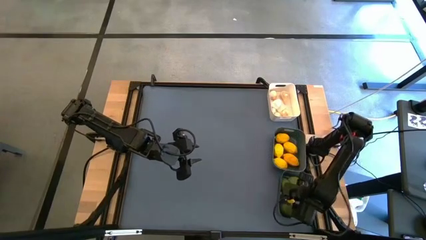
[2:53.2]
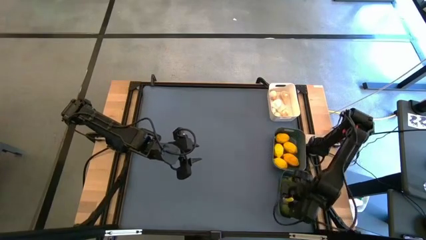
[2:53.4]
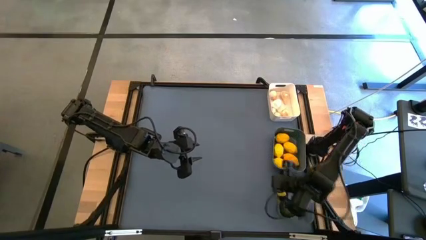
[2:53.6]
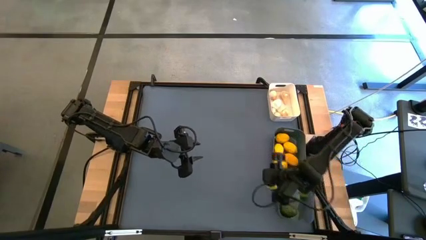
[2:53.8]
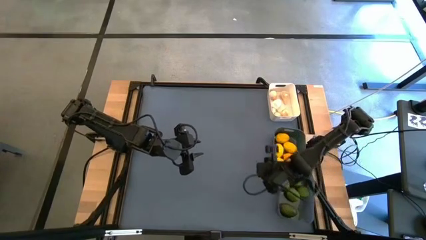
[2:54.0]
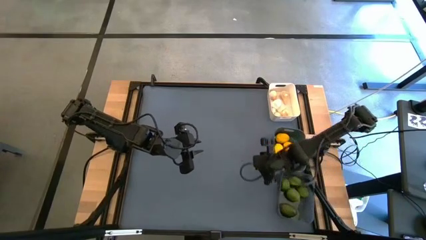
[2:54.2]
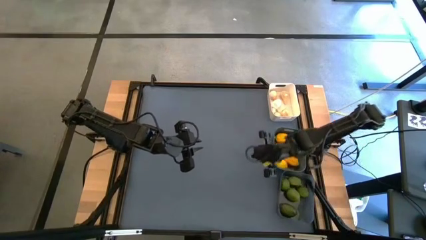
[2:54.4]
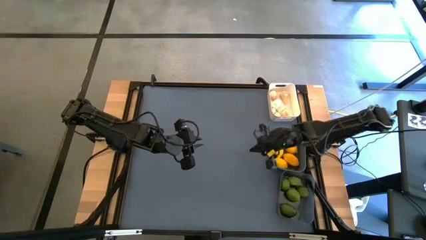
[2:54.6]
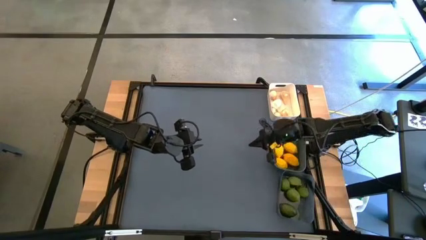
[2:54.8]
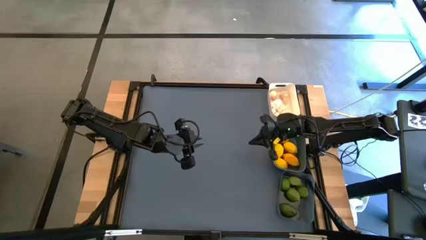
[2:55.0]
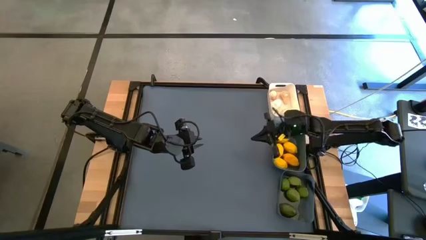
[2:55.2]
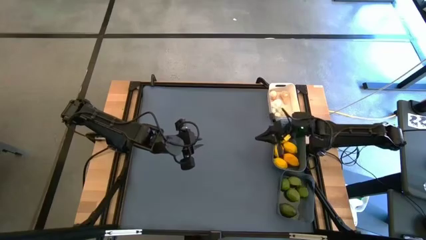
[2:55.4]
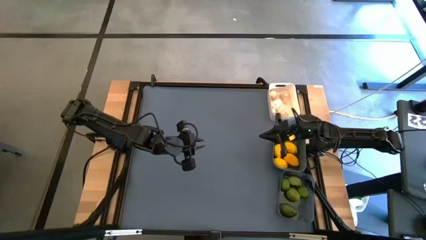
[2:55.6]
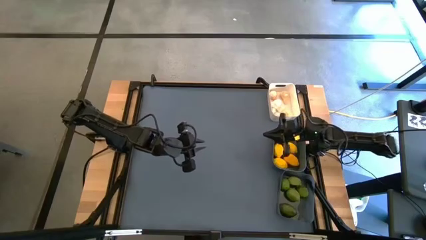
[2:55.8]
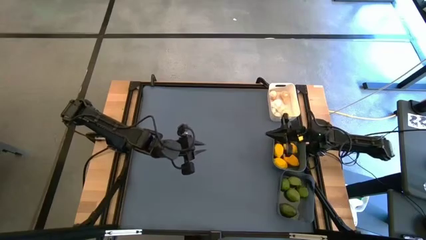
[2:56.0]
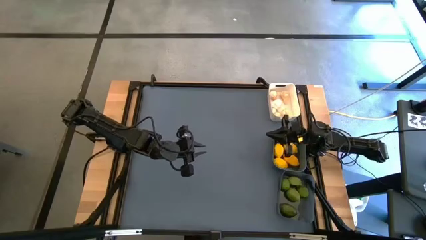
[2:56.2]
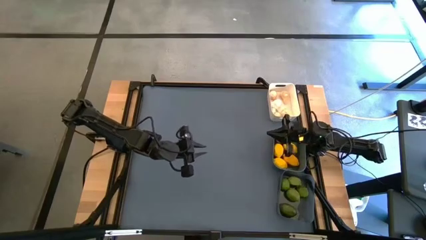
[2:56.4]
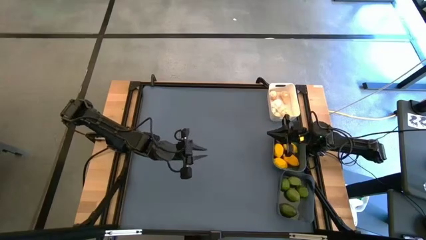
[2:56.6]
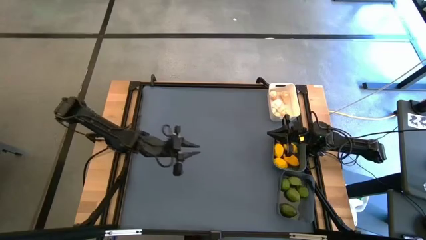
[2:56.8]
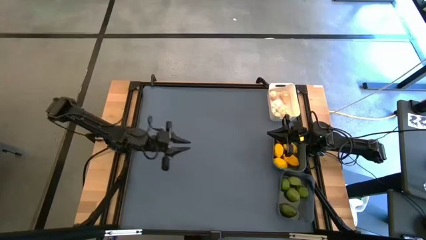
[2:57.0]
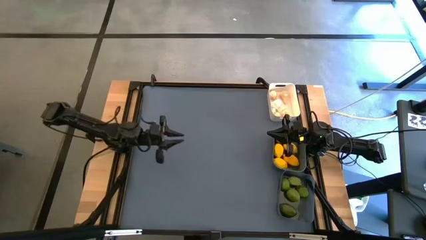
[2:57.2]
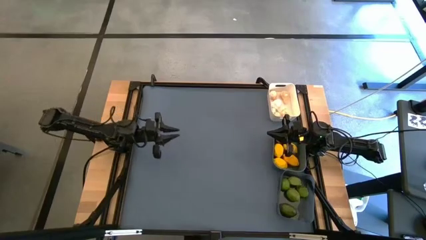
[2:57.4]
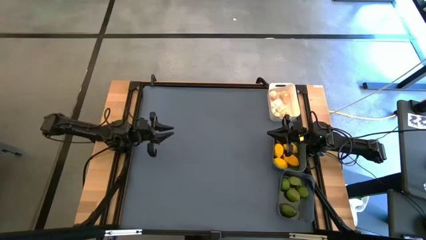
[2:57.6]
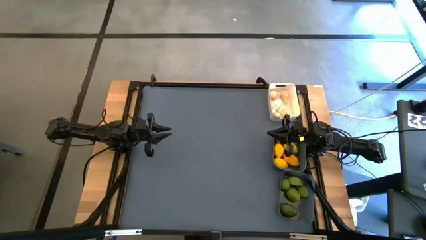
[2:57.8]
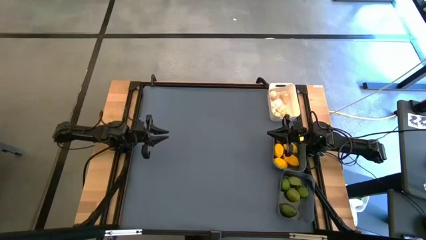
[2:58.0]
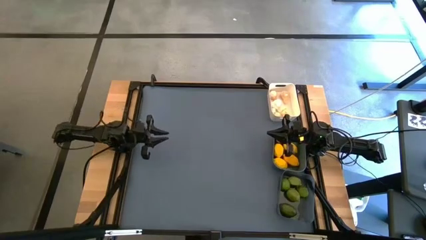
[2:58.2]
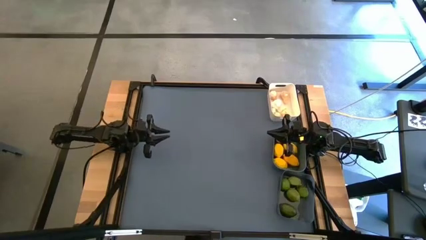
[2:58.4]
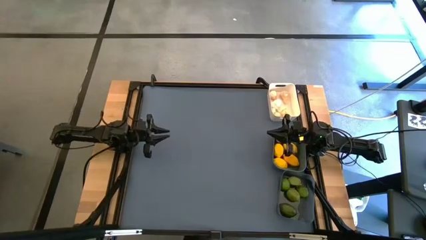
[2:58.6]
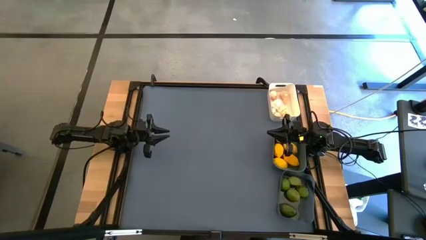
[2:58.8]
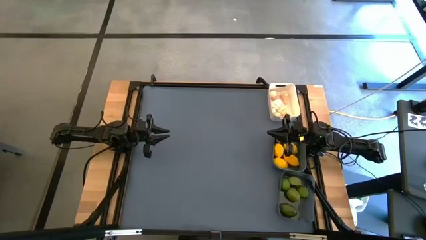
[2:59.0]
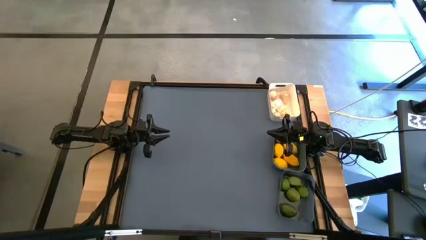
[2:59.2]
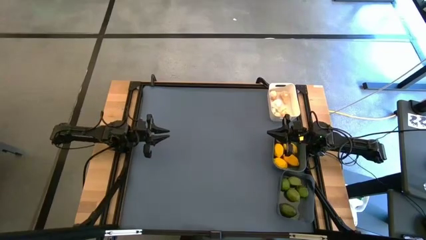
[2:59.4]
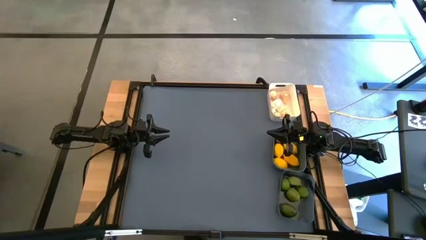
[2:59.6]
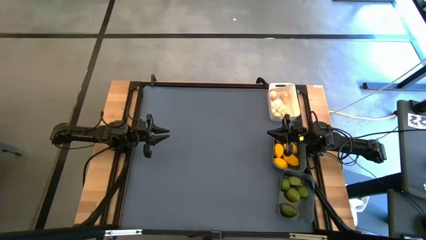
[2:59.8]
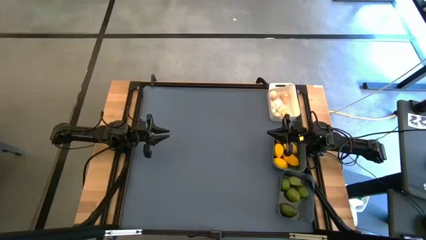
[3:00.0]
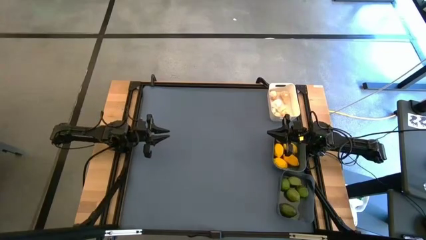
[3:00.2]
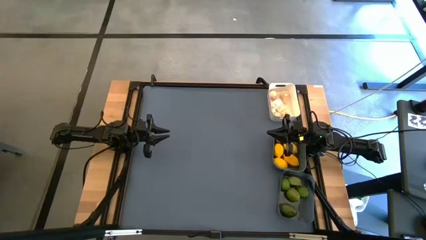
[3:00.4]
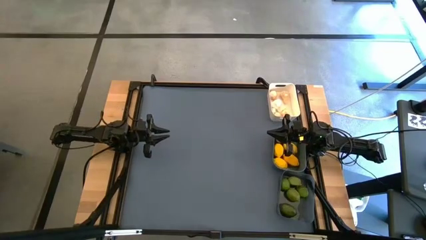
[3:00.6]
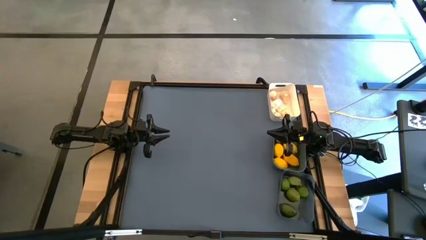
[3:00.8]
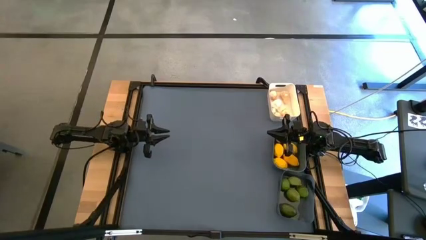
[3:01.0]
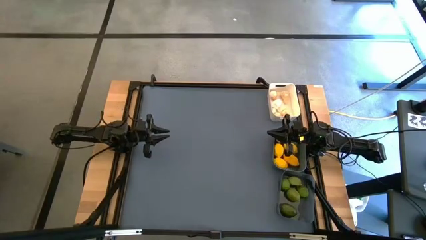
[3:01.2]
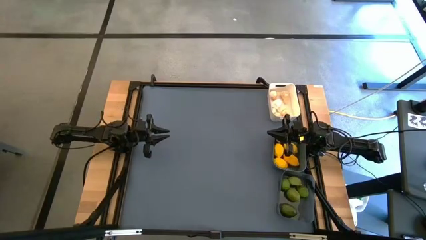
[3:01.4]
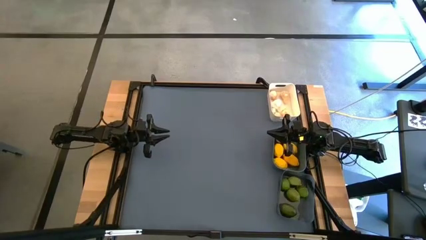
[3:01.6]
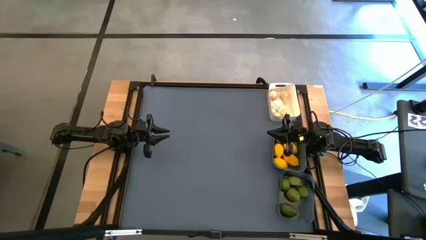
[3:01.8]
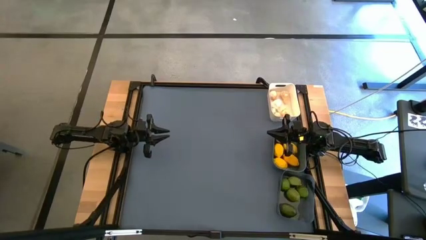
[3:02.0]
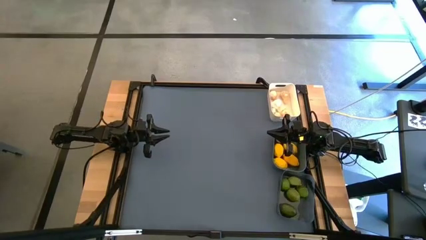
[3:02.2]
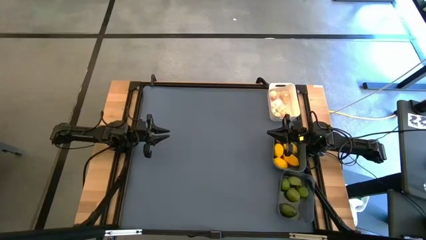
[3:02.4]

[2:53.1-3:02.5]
Task: Sort produce into baskets
Return to Home Position

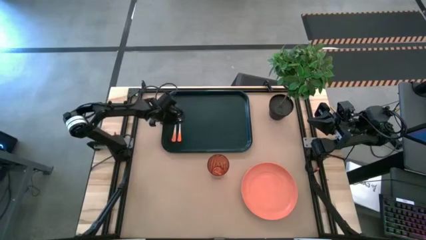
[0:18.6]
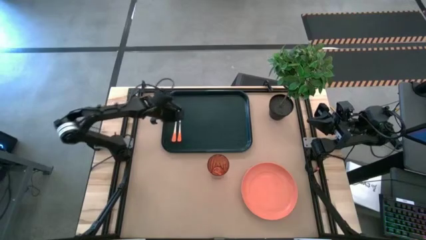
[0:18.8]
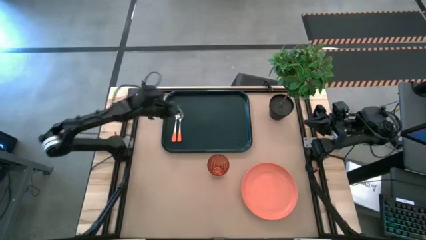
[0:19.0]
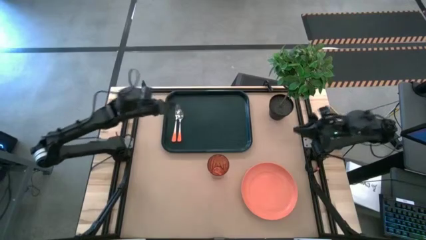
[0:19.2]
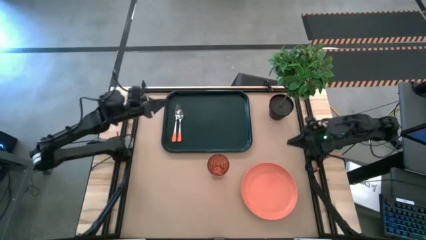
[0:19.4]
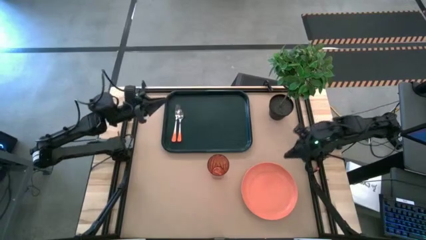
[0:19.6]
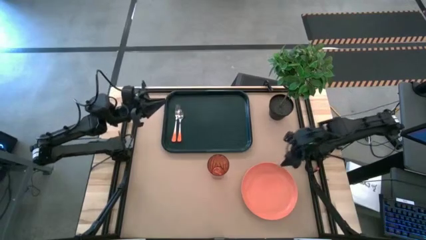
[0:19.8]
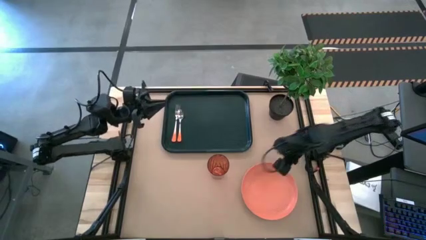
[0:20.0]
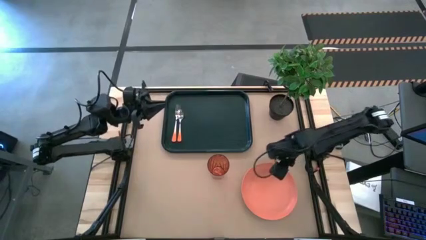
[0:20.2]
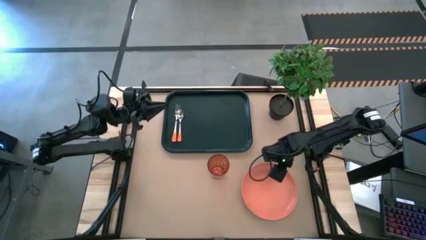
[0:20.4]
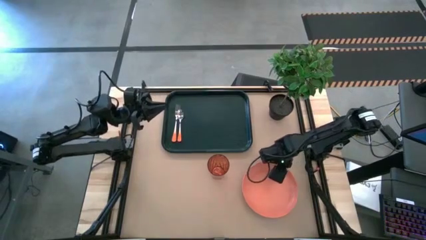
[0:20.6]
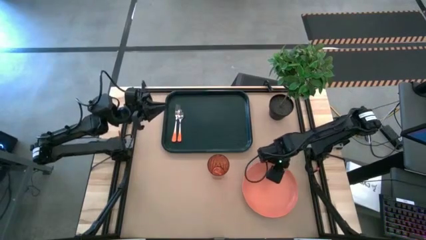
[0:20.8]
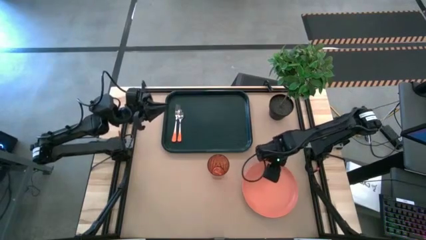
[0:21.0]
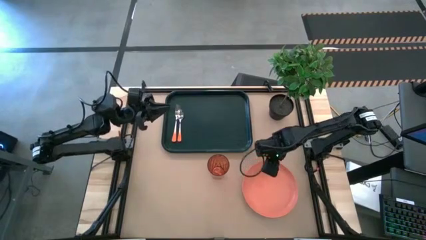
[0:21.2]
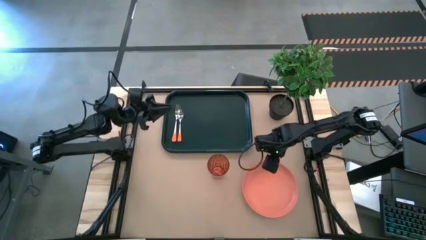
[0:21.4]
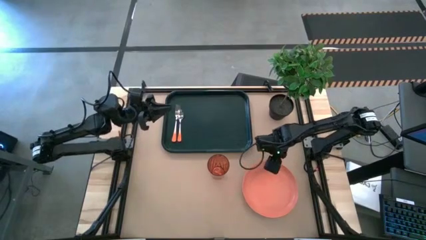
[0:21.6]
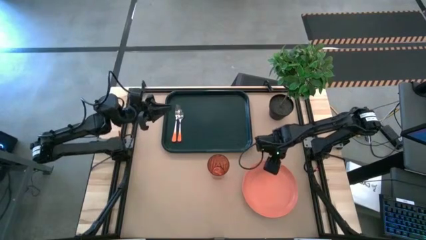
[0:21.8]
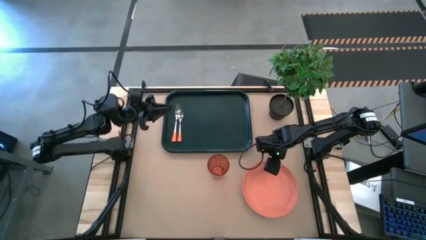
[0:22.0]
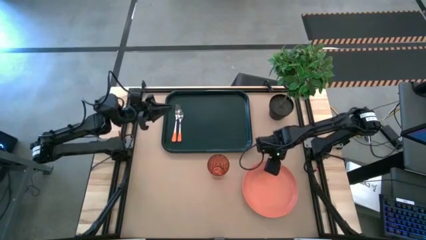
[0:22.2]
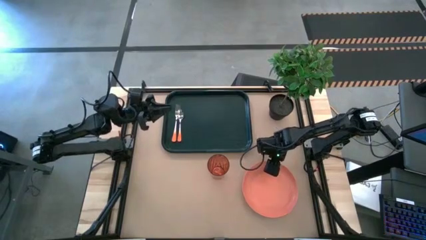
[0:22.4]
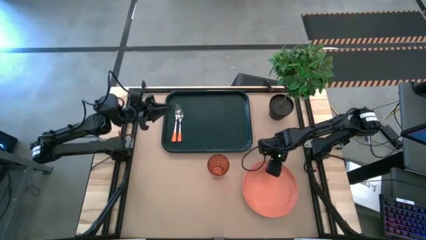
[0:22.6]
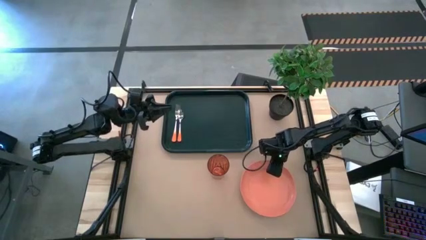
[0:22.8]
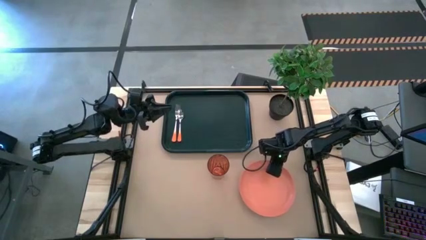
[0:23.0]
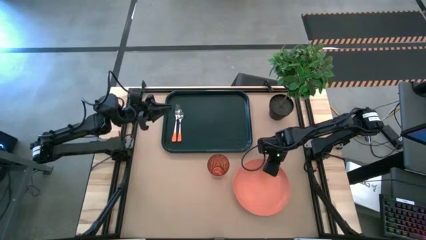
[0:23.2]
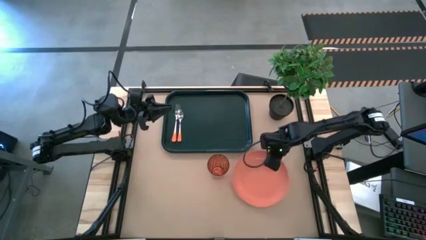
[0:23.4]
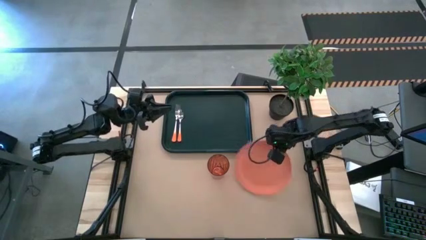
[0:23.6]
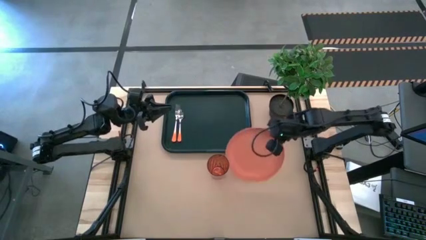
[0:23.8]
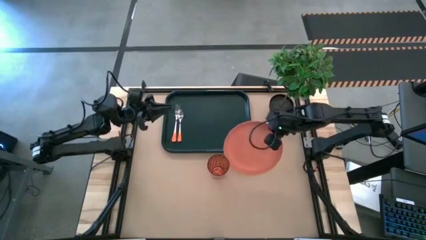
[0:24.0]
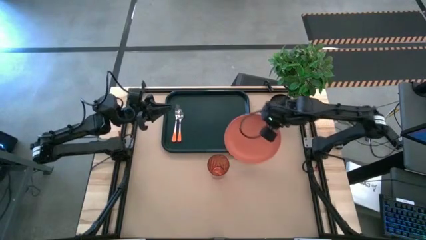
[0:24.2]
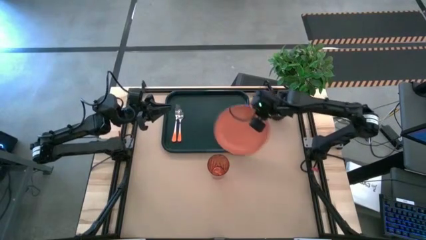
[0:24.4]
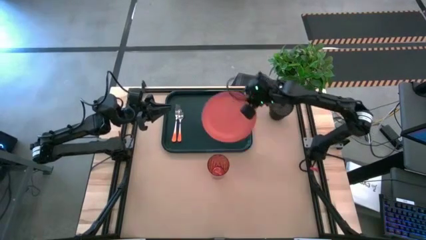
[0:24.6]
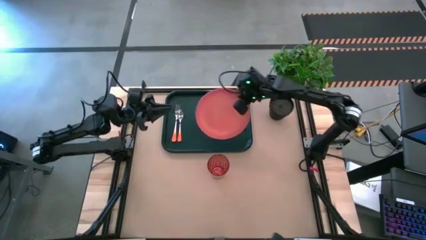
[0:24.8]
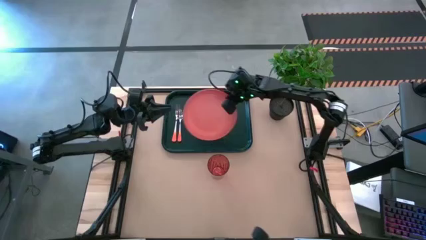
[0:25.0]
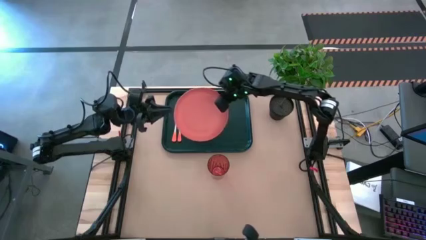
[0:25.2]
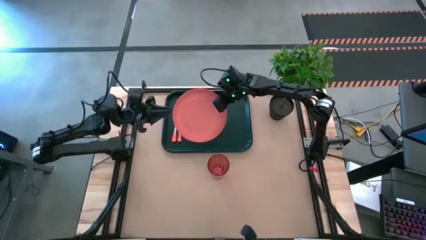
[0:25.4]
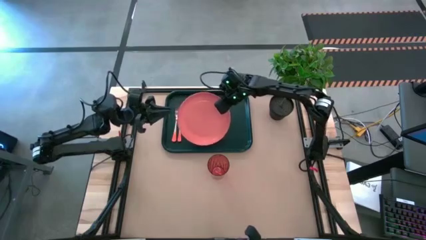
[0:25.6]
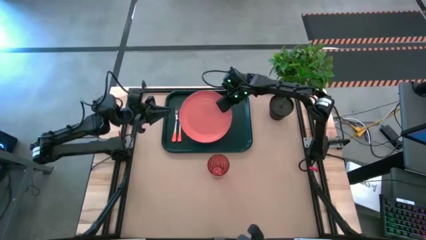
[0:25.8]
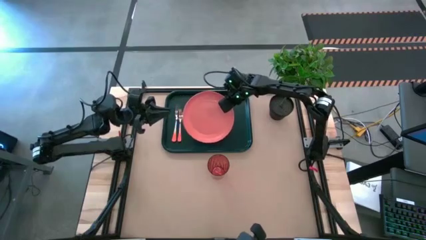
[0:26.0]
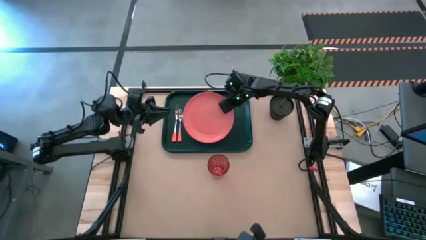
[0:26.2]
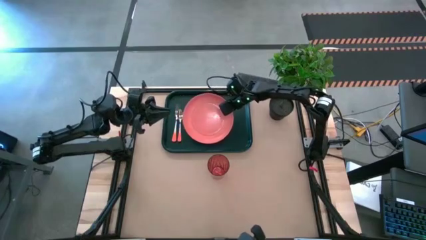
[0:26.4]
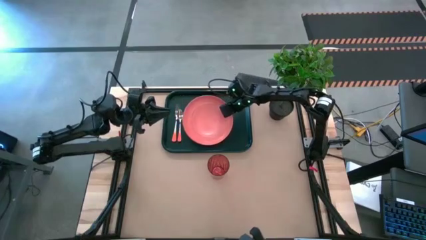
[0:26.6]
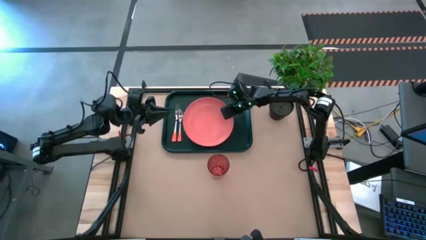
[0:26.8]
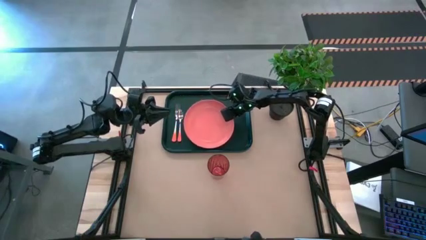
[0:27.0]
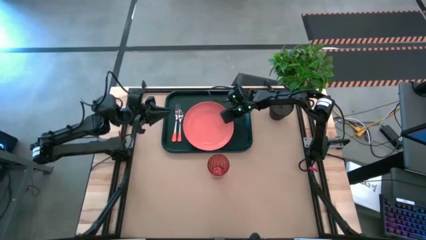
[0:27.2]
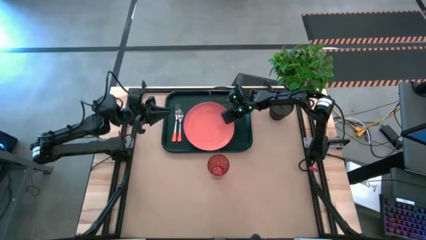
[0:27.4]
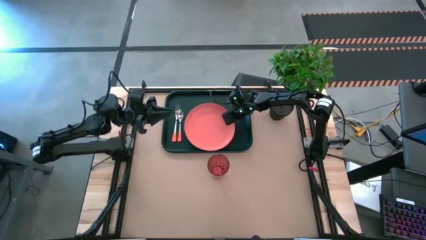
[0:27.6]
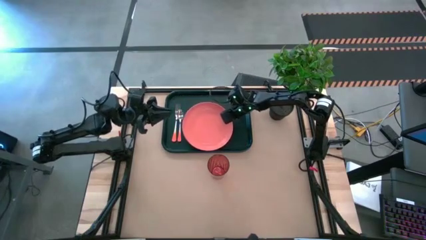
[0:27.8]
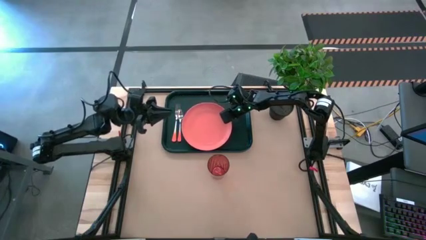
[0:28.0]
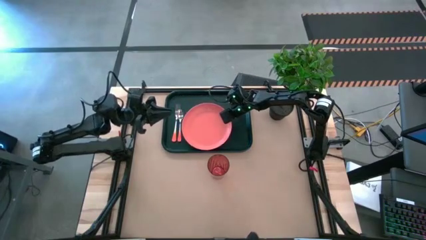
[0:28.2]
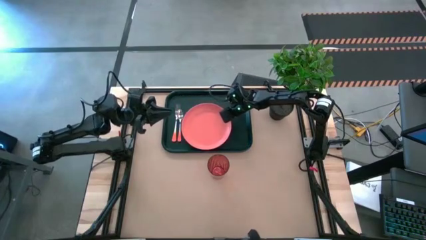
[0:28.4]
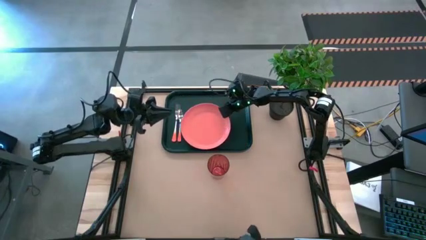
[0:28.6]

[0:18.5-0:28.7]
Task: Pick and place plate/cup/fork/spoon on tray
Put the orange plate on the black serving tray to the right of the orange spoon
